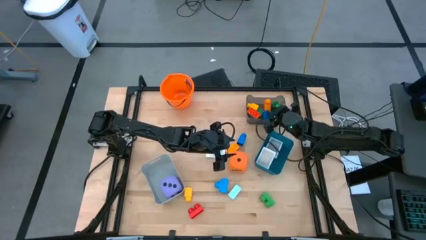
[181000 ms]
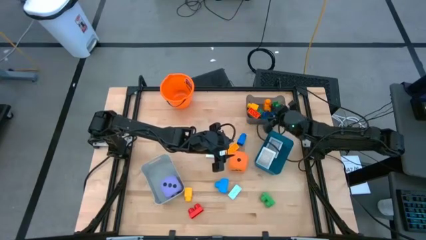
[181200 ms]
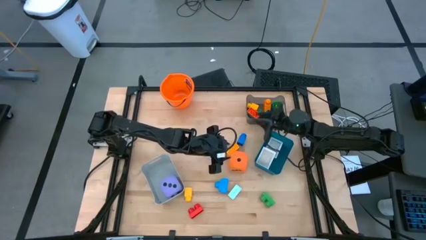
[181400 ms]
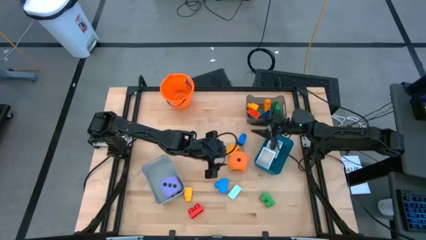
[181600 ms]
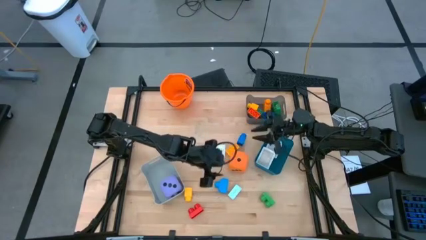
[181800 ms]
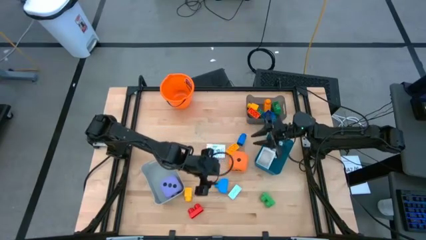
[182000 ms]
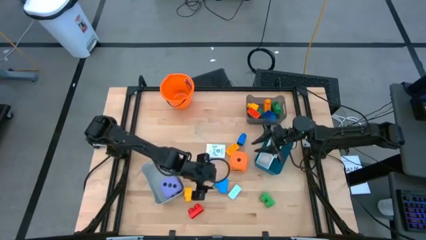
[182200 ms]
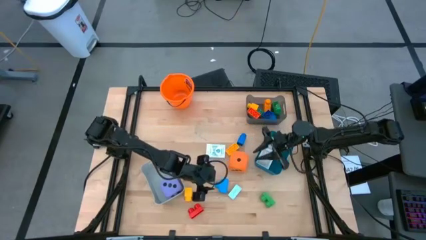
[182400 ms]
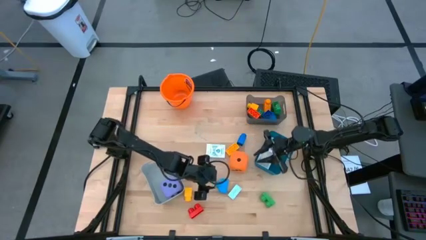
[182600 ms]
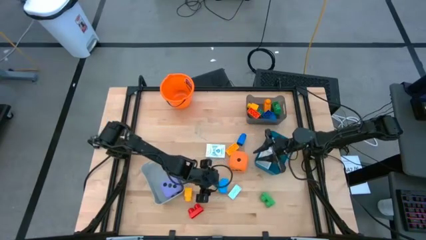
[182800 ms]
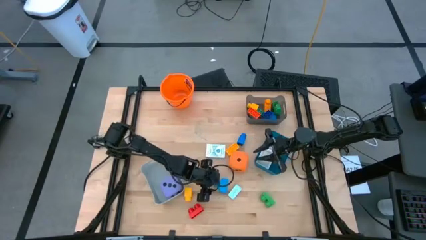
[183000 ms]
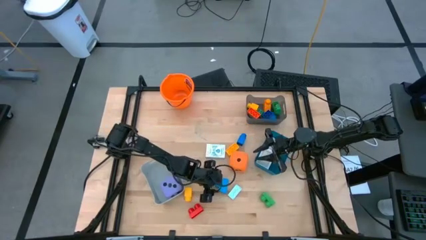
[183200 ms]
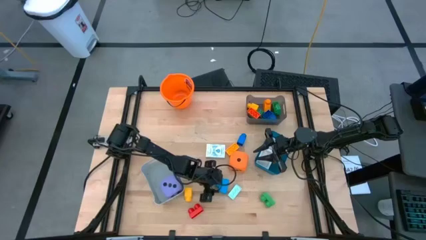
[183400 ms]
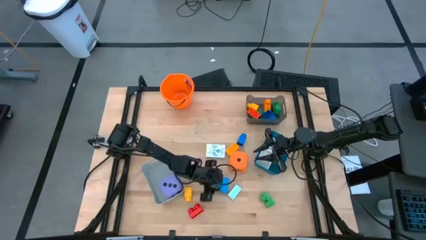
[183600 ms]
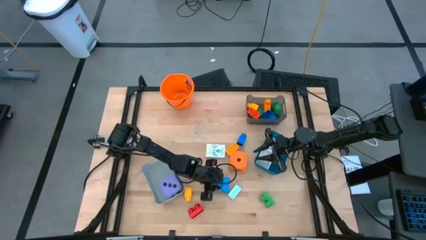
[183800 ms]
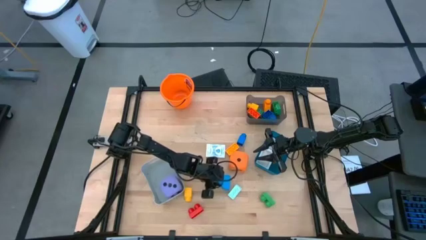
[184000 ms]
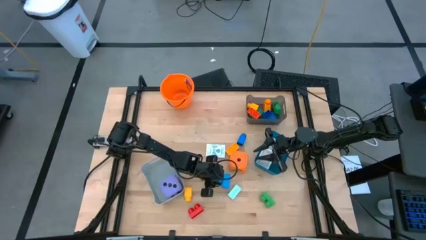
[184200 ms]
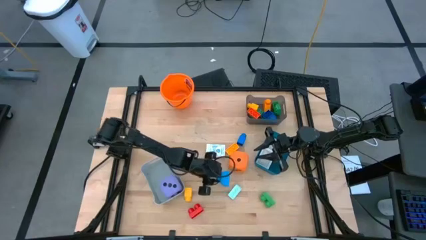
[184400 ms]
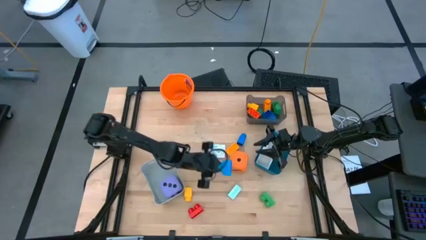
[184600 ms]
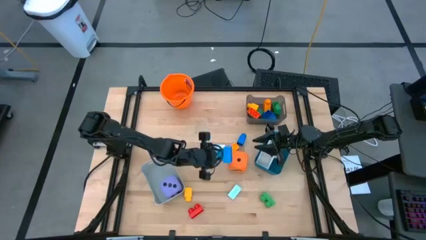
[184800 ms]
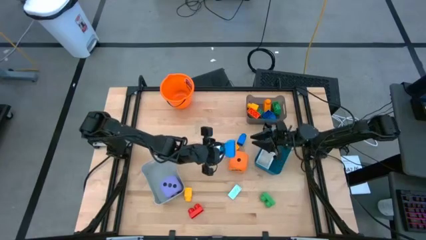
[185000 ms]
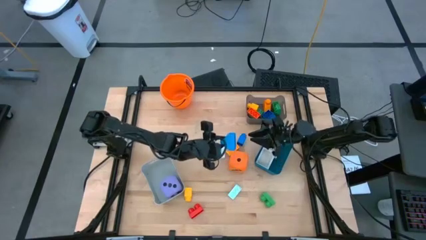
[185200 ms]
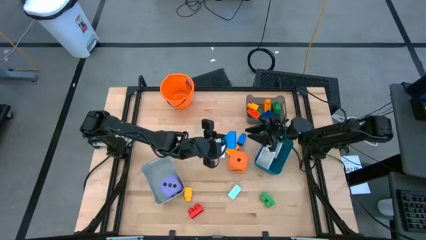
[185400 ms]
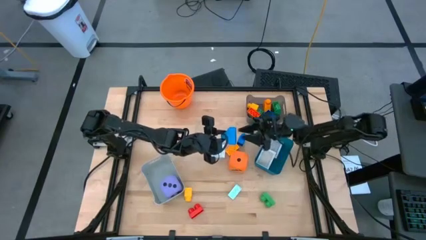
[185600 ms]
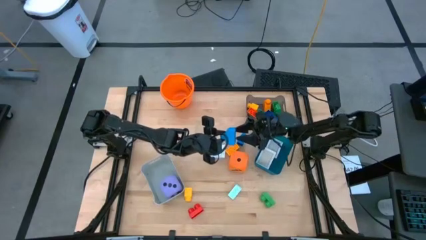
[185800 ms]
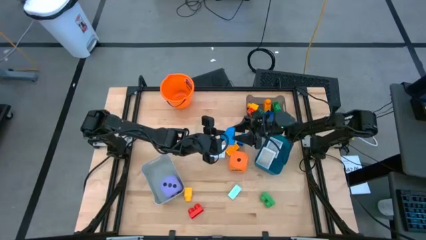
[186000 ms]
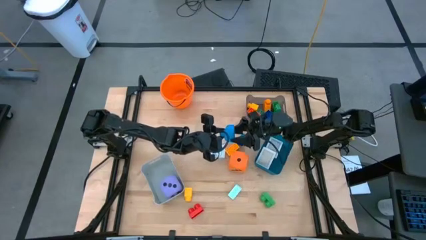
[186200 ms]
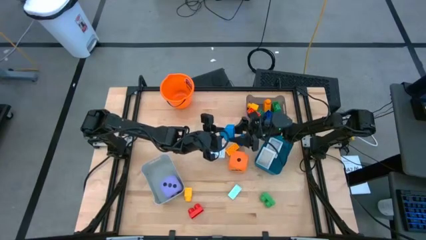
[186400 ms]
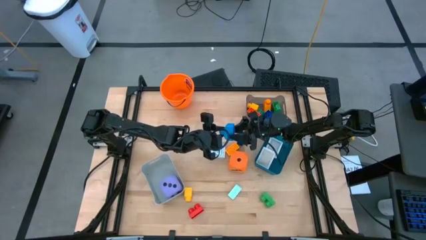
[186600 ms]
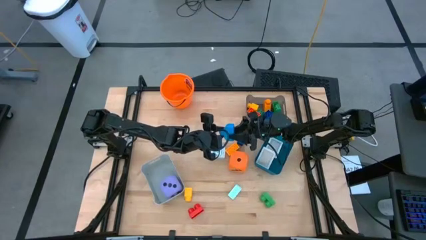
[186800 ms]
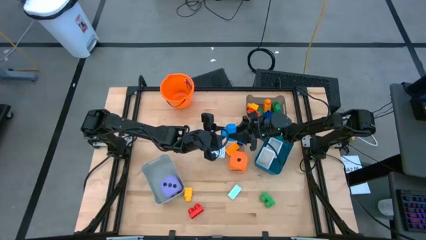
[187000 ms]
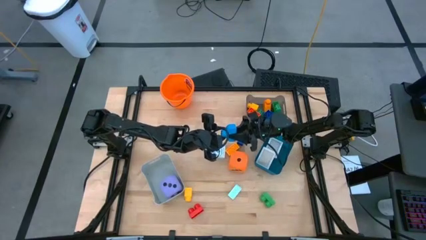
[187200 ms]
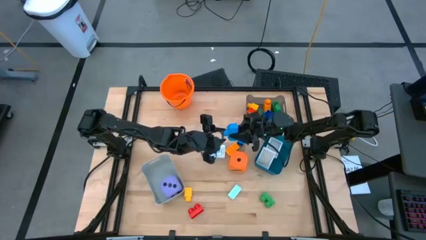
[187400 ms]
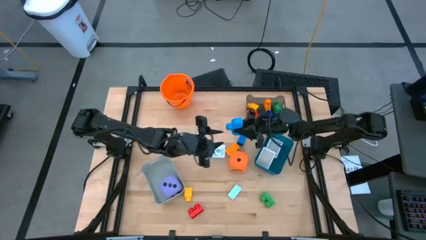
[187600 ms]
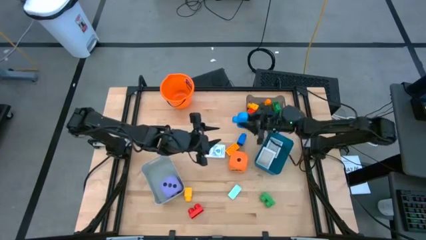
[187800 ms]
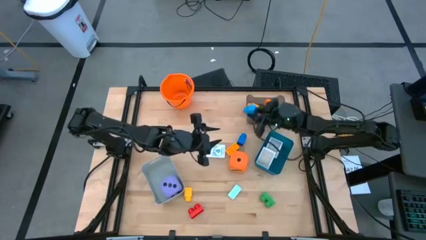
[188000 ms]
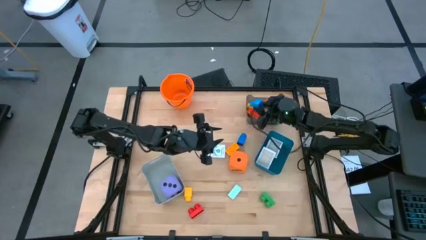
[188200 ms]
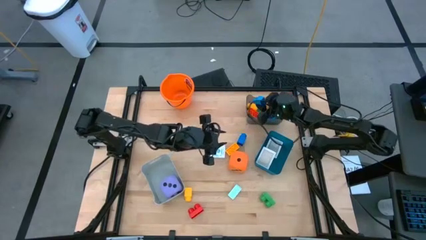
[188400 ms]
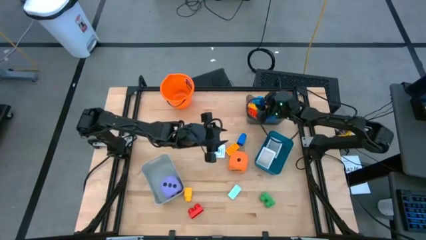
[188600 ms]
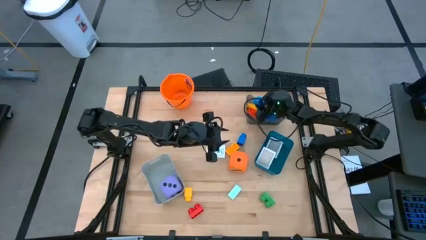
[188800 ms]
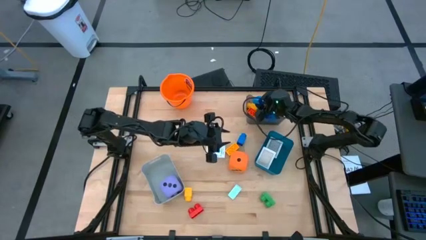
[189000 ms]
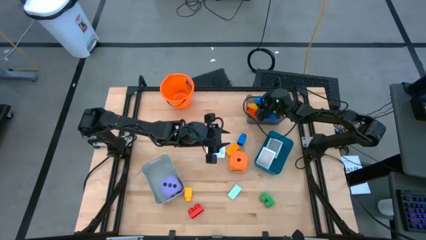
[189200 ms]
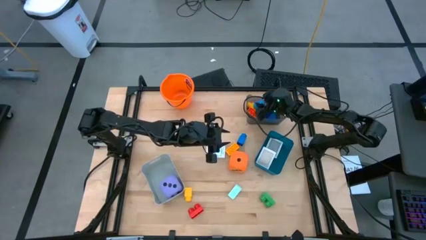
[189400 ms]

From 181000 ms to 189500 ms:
Task: Pick & Place Toys
Put the blue game piece into the black bin

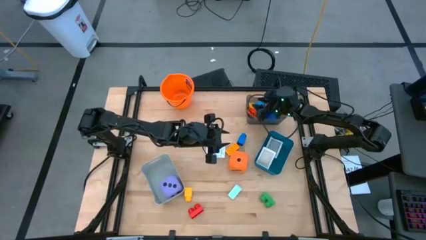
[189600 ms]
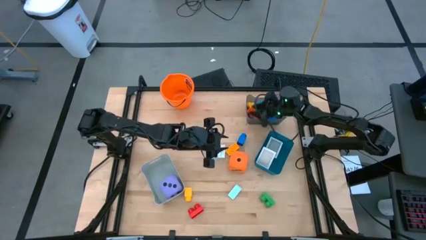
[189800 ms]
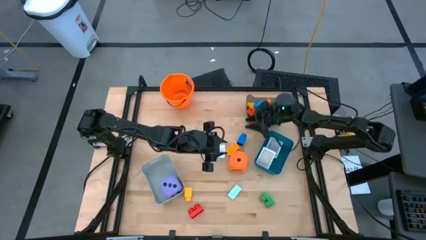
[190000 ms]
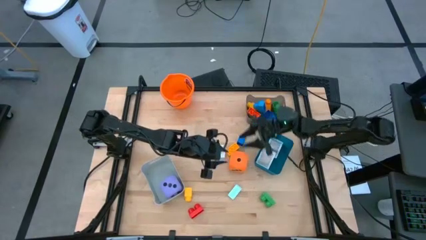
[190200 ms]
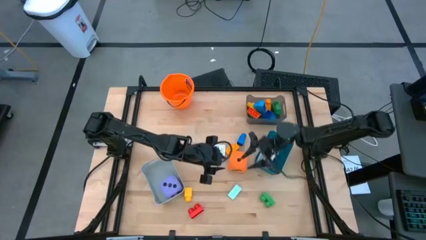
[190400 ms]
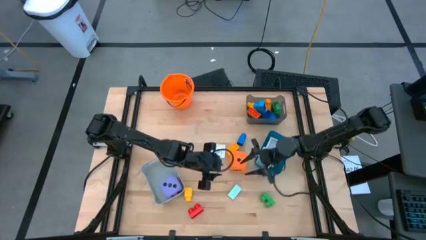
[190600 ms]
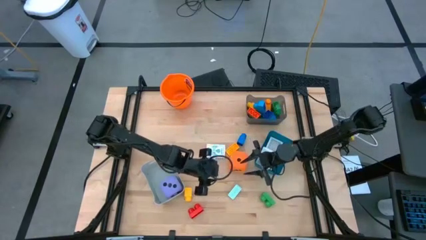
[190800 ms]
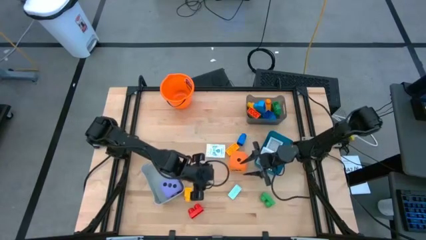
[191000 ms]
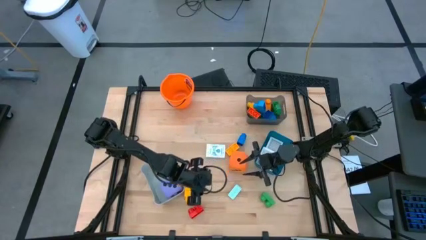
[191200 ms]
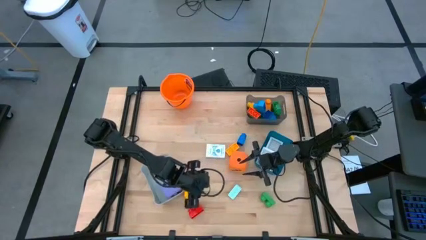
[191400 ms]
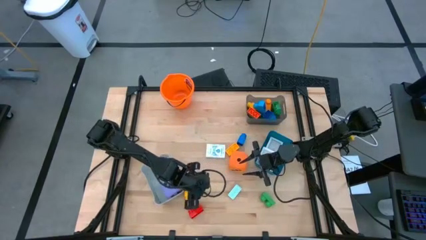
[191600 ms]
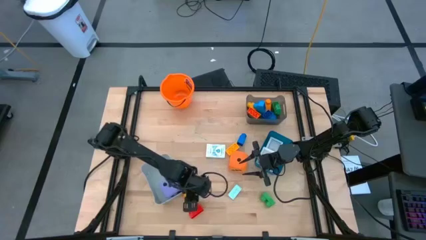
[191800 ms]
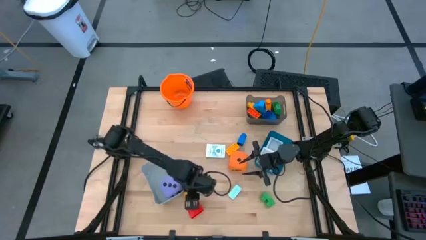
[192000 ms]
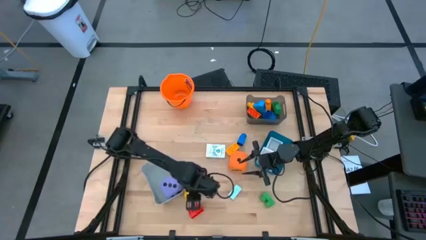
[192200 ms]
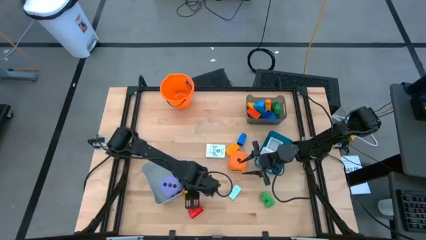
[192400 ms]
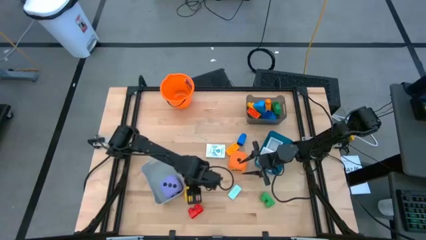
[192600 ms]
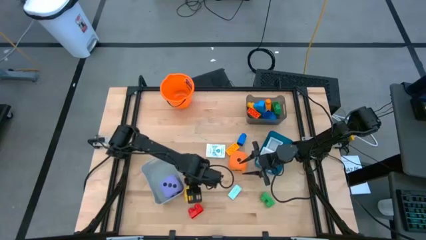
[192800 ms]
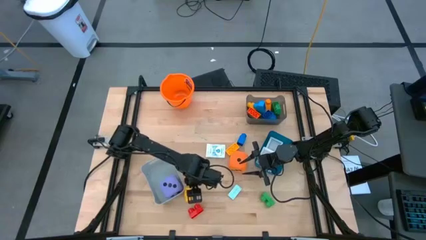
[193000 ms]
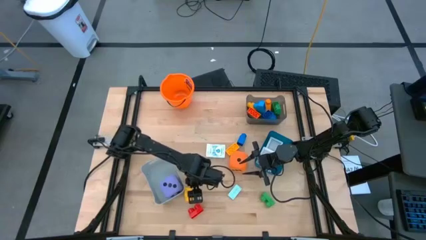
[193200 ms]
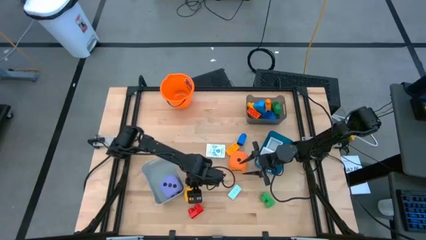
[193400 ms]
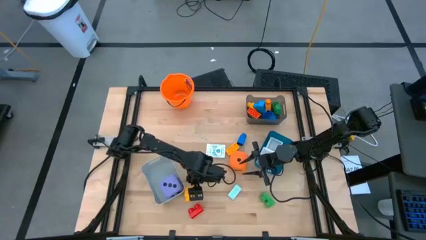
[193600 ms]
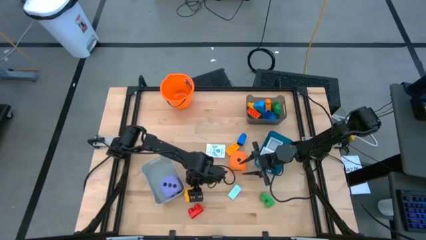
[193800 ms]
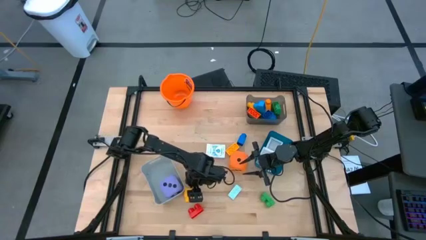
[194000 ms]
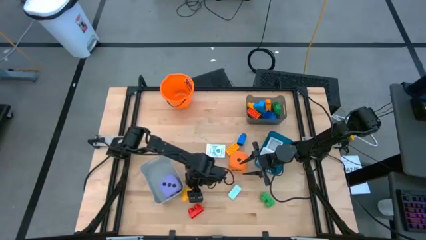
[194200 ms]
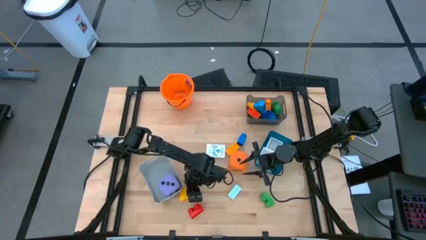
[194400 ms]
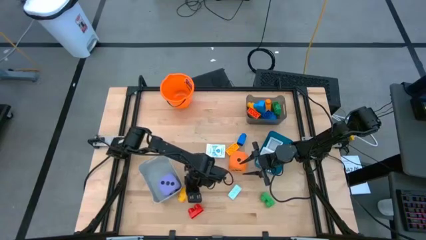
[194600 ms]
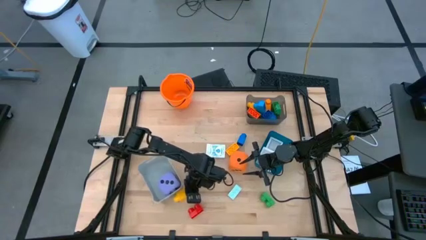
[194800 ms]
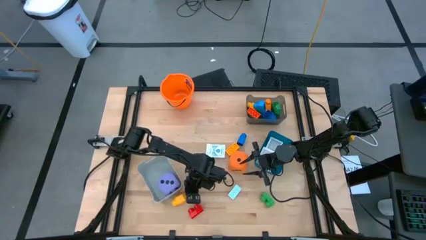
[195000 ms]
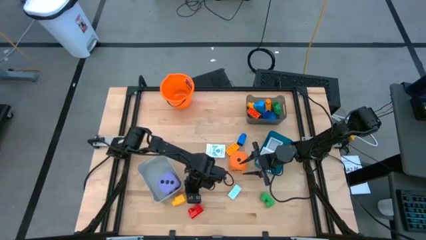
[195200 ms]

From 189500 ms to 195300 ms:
Put the yellow game piece into the black bin
